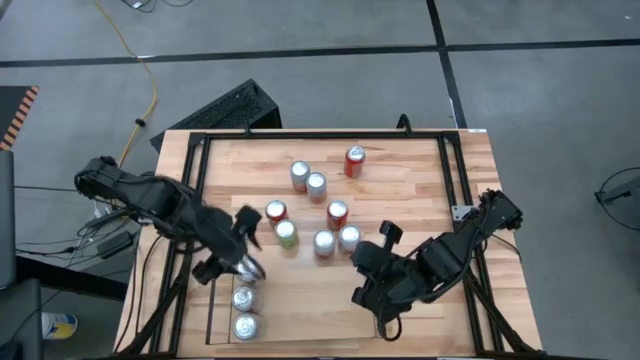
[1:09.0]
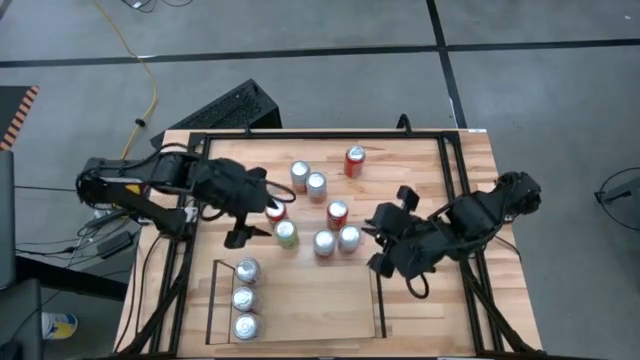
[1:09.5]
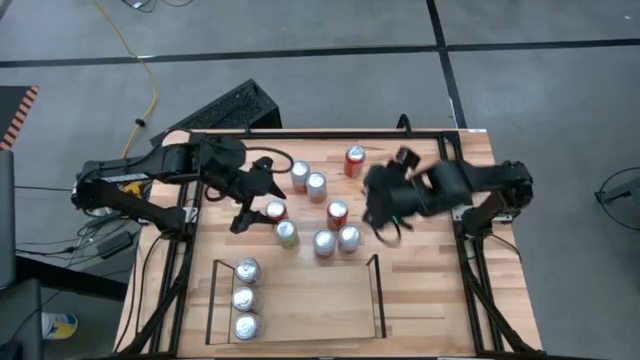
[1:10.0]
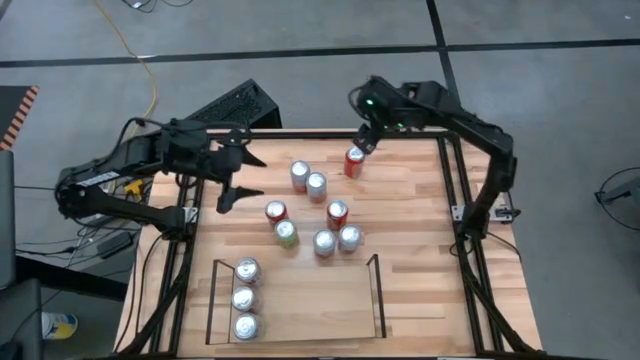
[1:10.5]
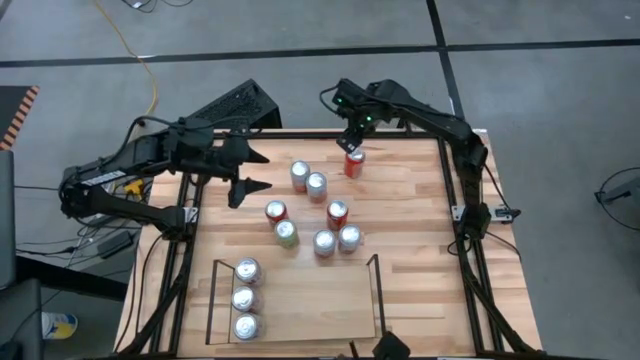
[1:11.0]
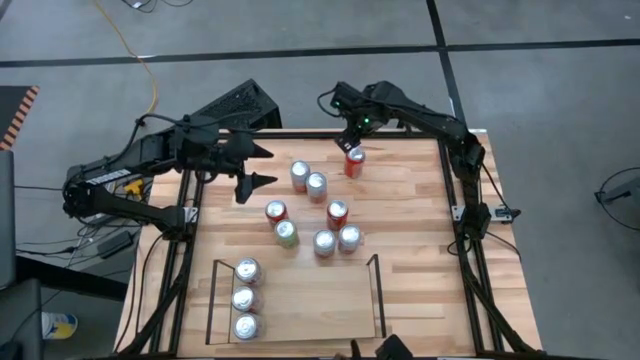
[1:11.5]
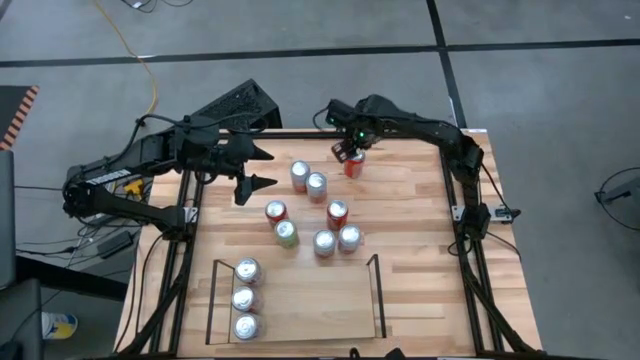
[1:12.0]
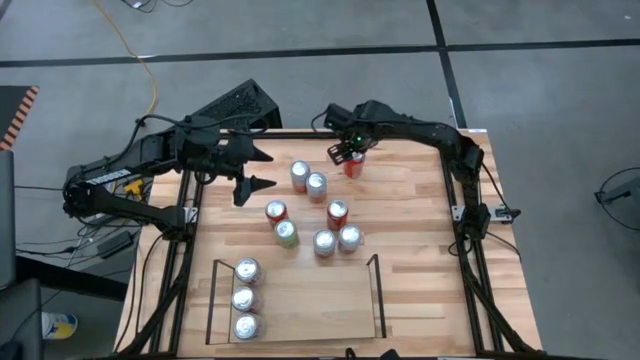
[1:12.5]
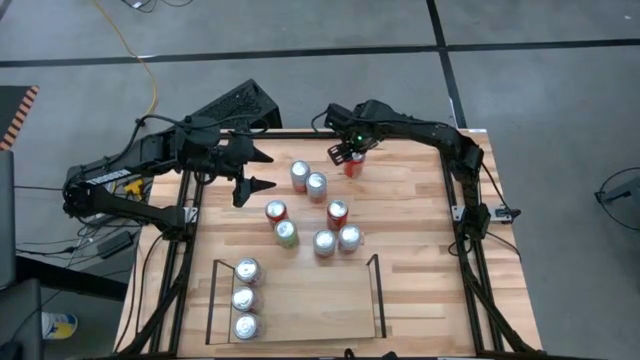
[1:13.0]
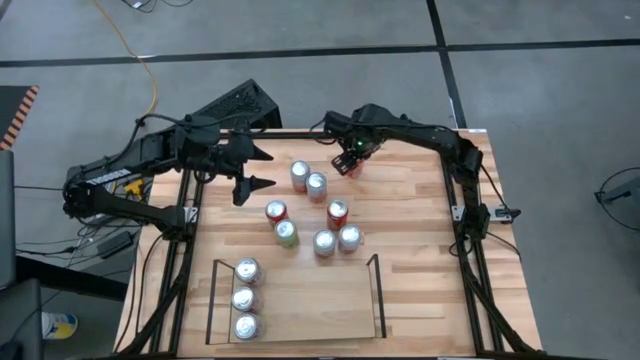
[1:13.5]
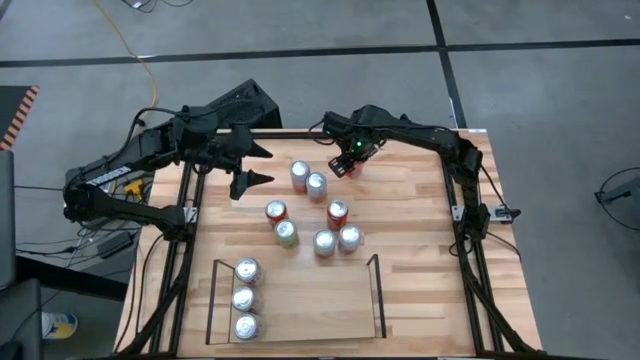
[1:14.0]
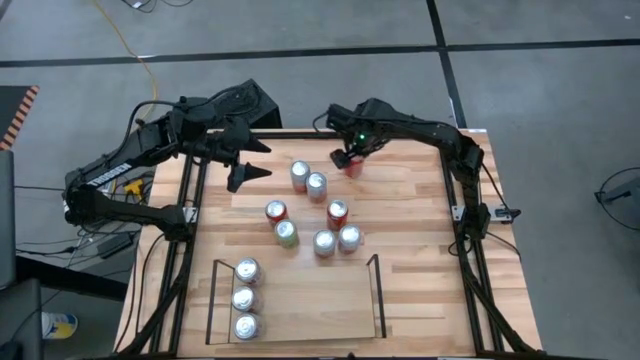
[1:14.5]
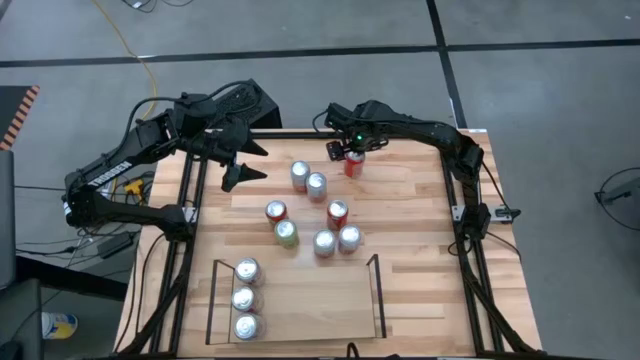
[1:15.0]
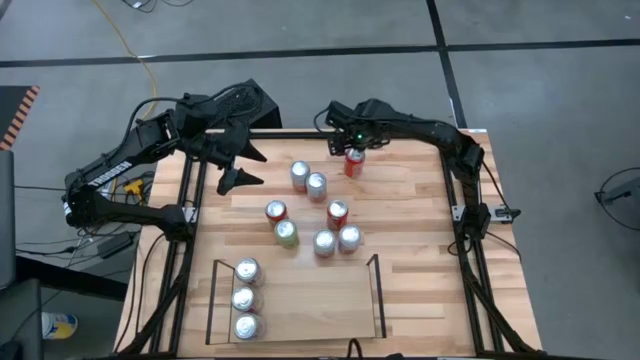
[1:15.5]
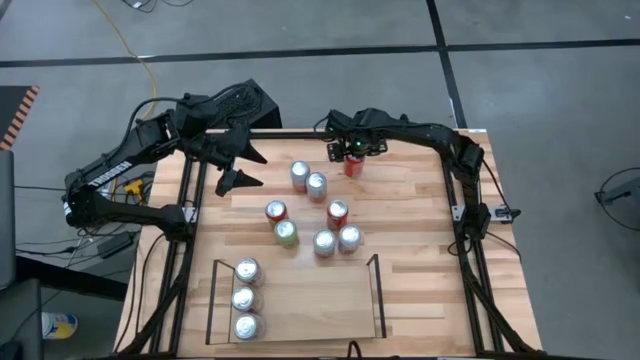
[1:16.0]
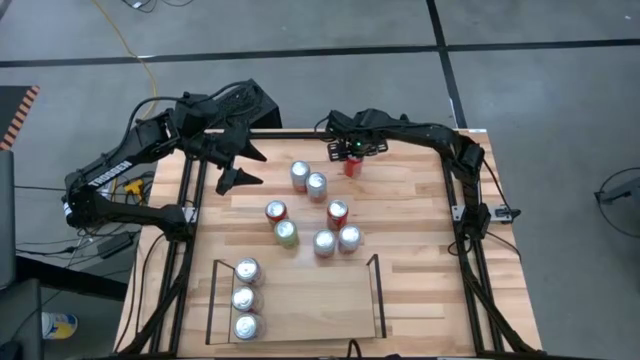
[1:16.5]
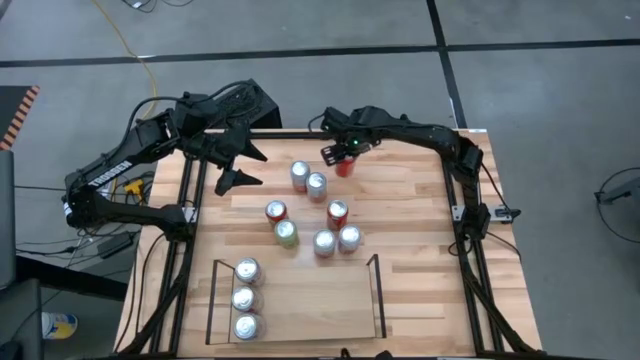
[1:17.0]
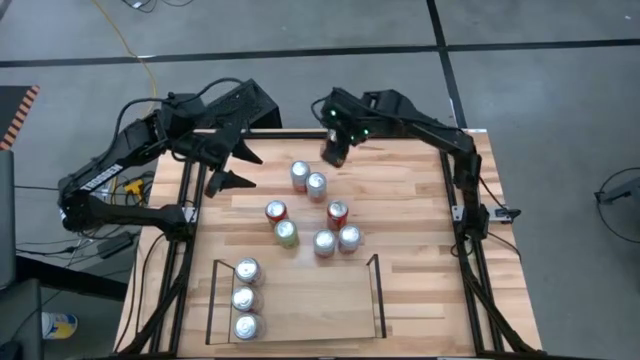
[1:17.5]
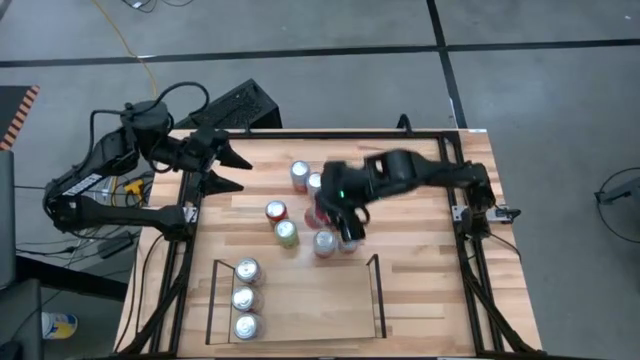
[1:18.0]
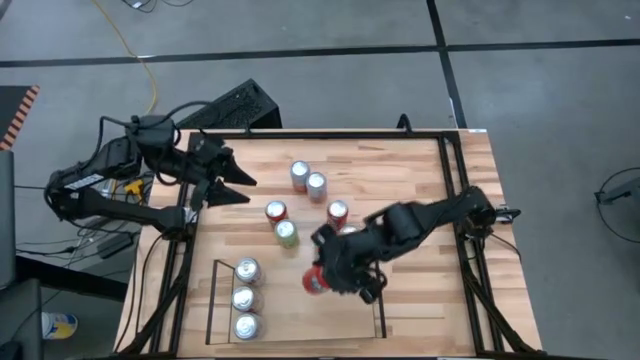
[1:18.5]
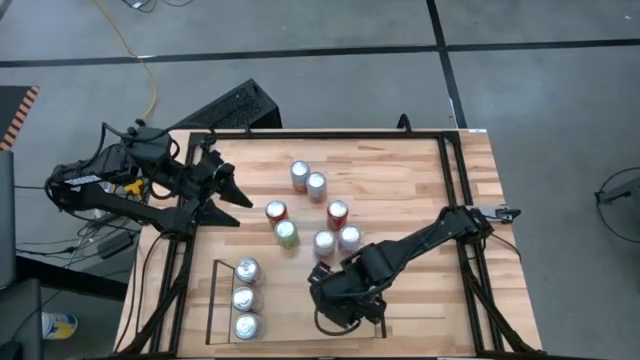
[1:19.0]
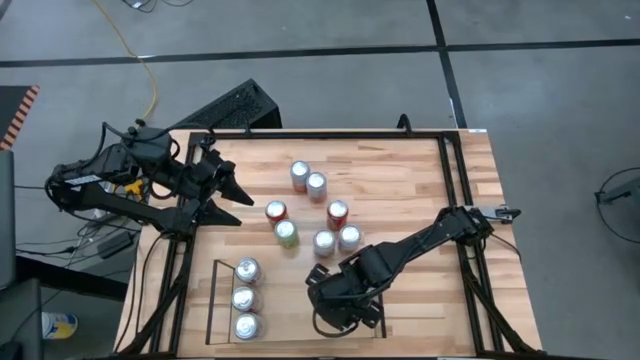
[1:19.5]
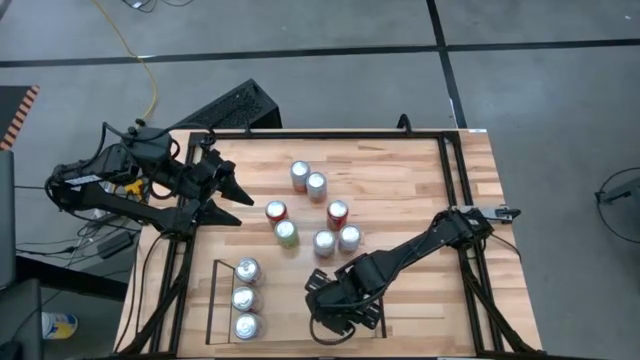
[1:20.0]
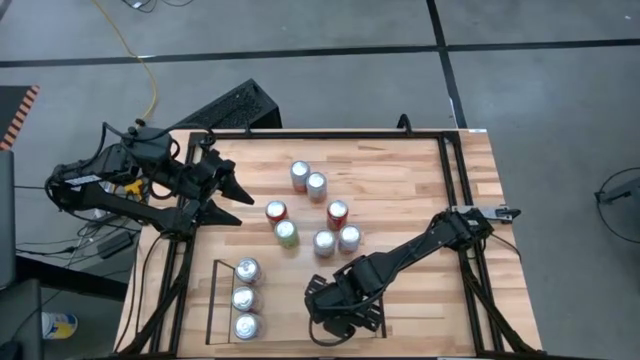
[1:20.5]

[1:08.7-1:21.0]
Task: Place canned beverage on shelf
Put the red soda can on the shelf

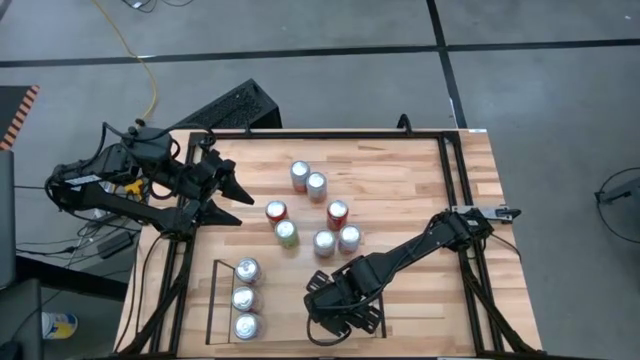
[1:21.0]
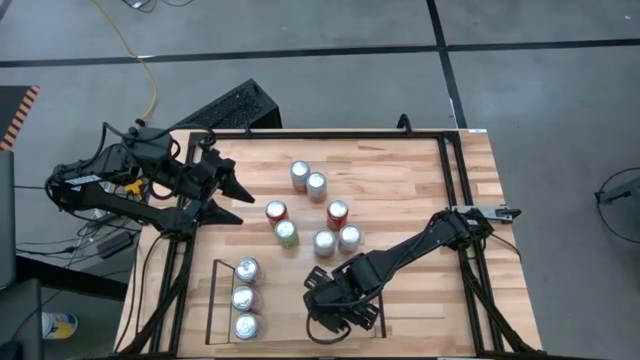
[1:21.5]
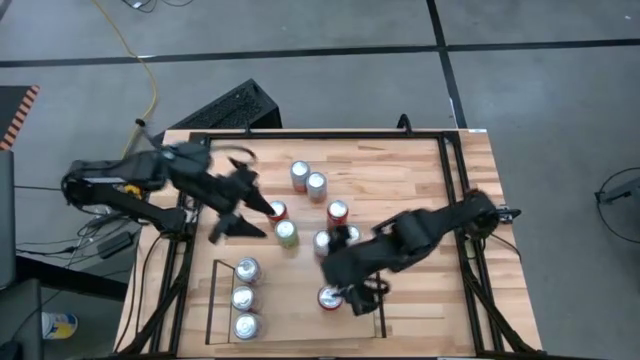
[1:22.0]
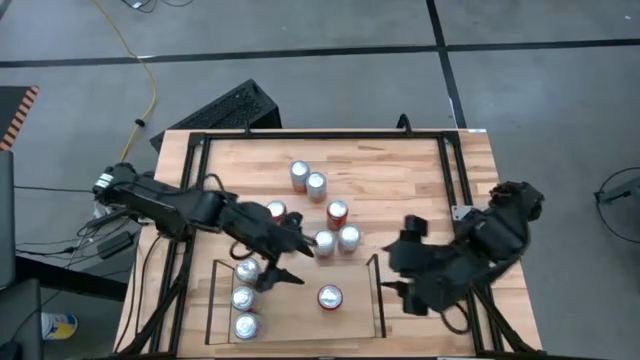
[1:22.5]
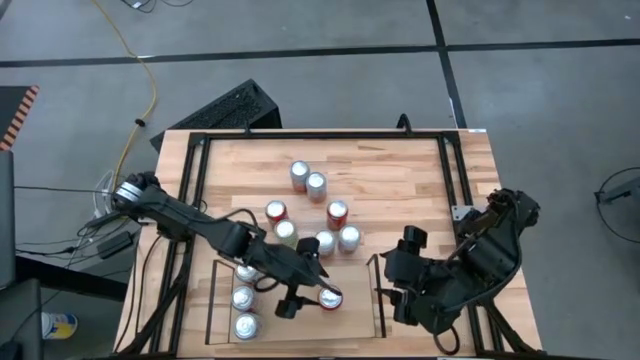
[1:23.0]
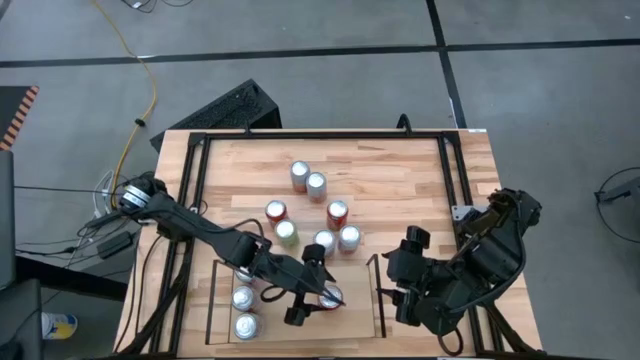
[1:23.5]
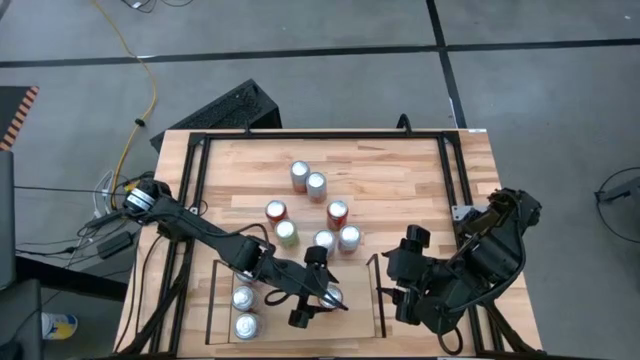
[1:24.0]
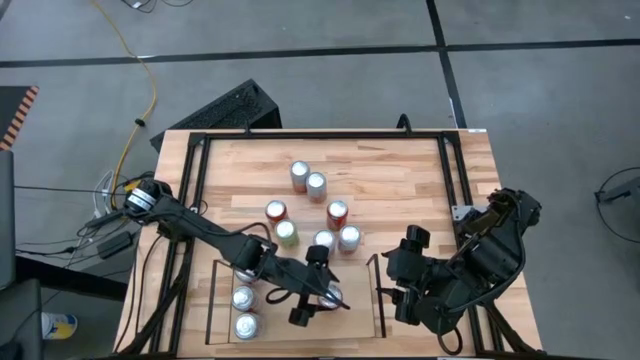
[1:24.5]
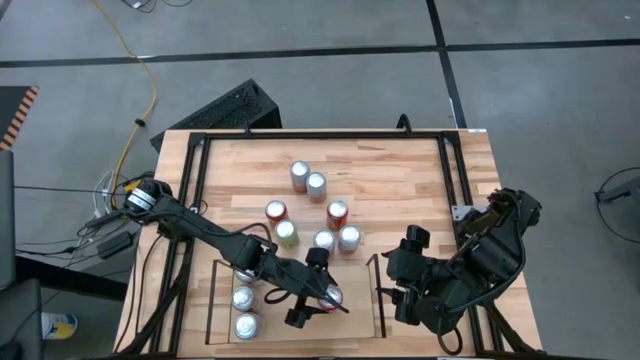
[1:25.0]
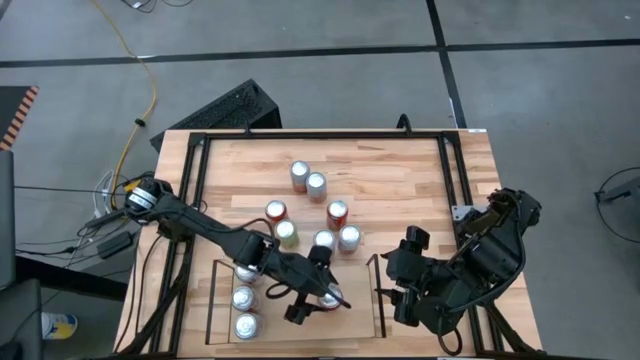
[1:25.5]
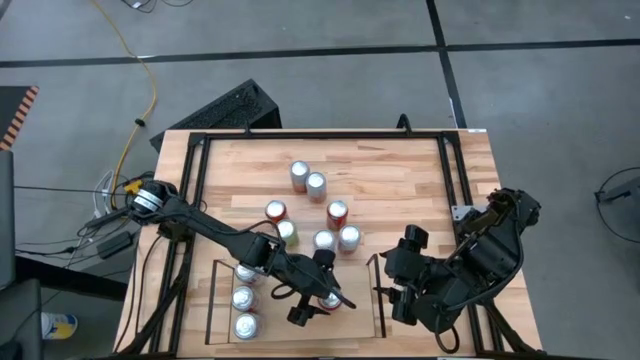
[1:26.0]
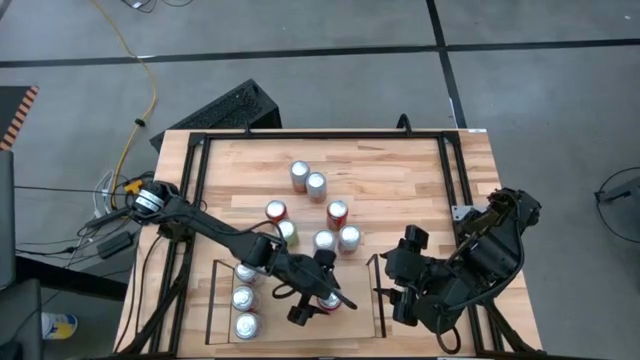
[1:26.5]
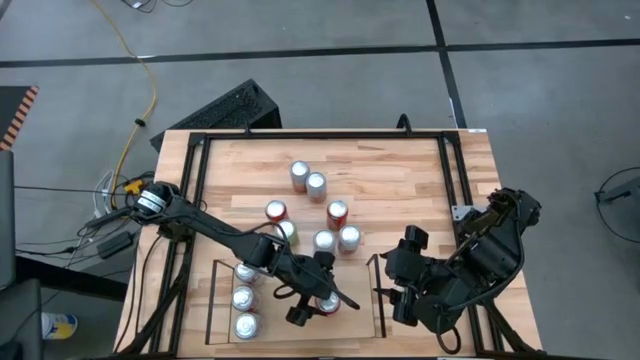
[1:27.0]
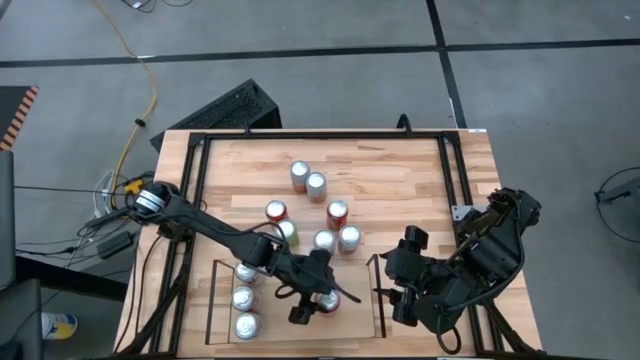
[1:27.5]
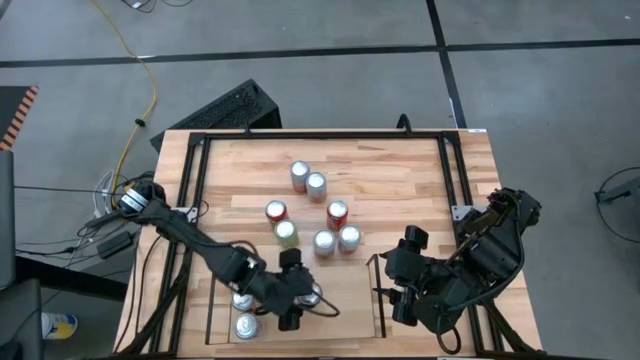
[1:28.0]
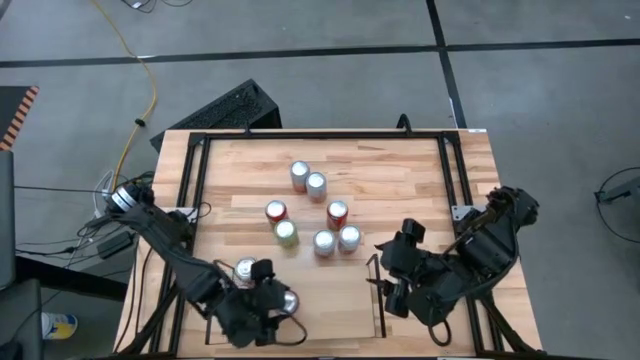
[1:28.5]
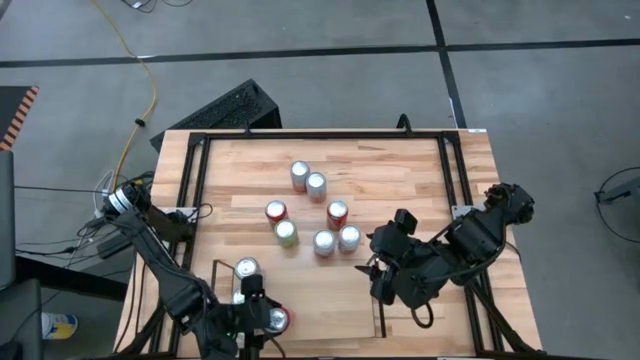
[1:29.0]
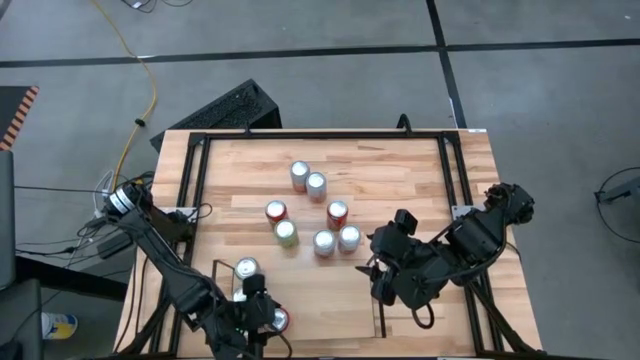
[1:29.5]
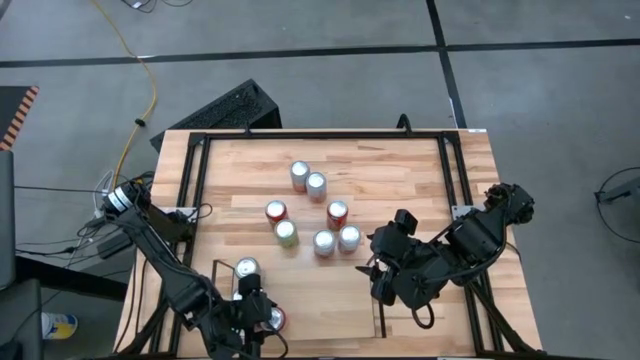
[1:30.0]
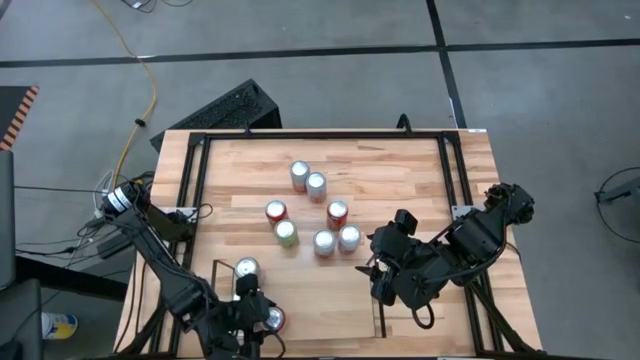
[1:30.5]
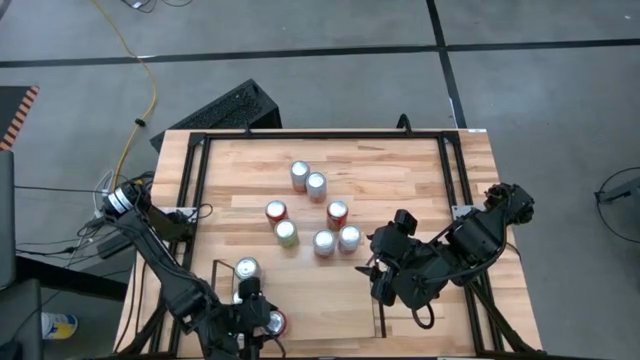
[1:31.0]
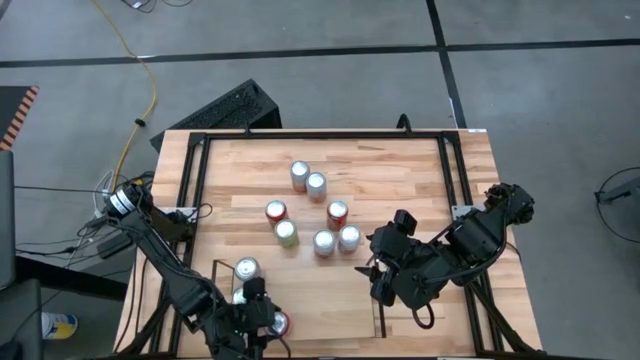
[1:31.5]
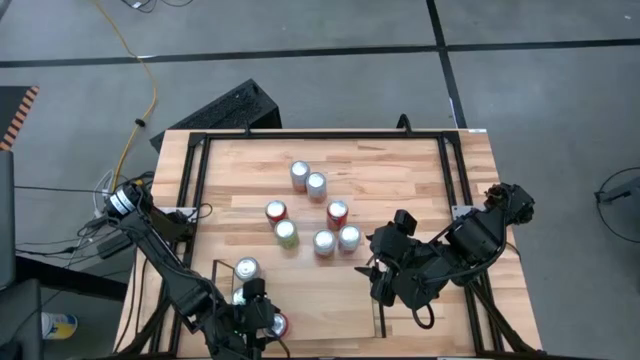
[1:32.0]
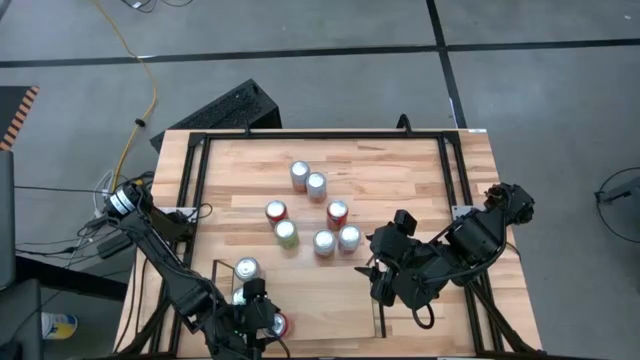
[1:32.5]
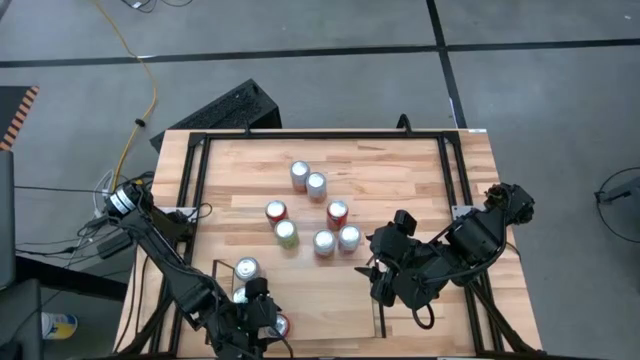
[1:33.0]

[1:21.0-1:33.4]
Put the red soda can on the shelf
